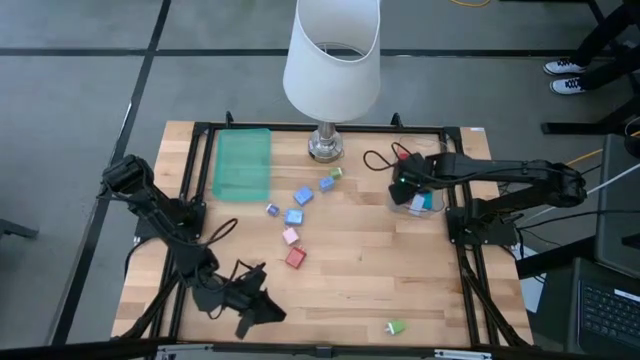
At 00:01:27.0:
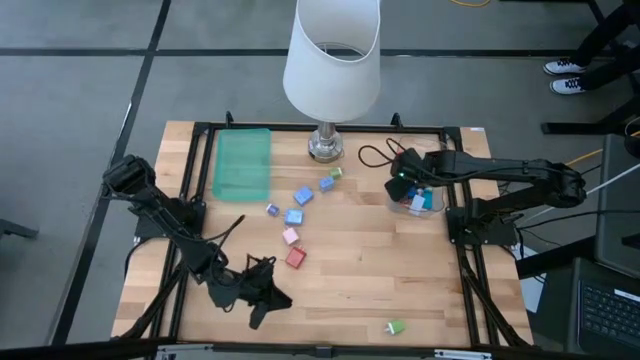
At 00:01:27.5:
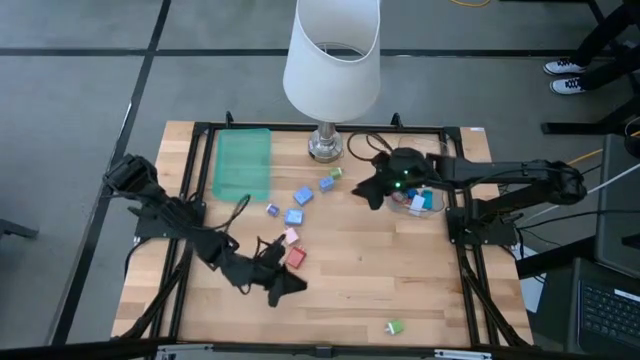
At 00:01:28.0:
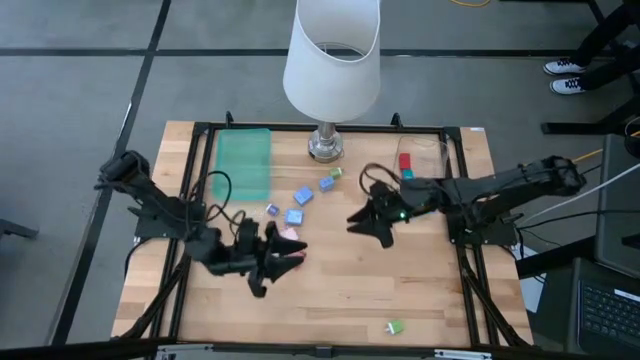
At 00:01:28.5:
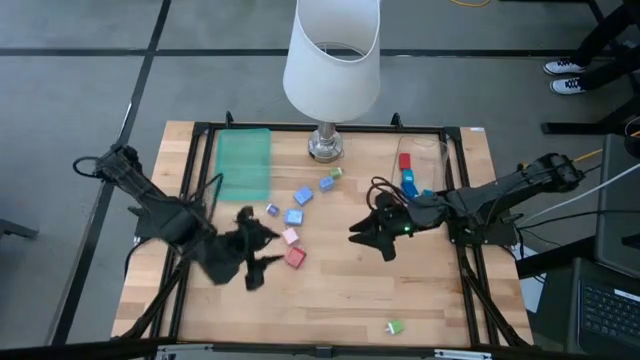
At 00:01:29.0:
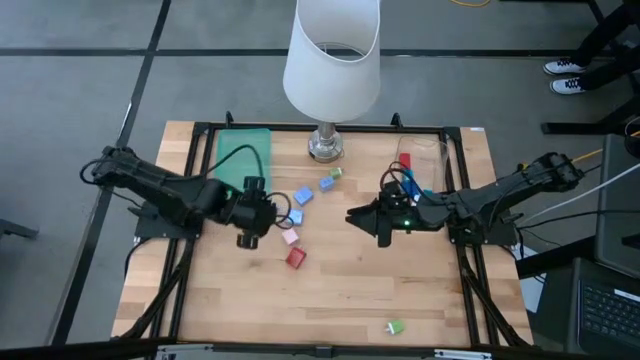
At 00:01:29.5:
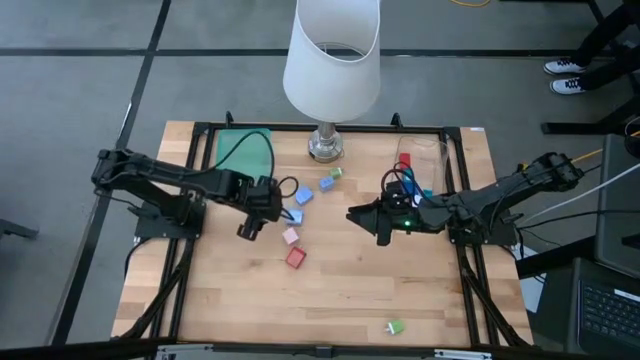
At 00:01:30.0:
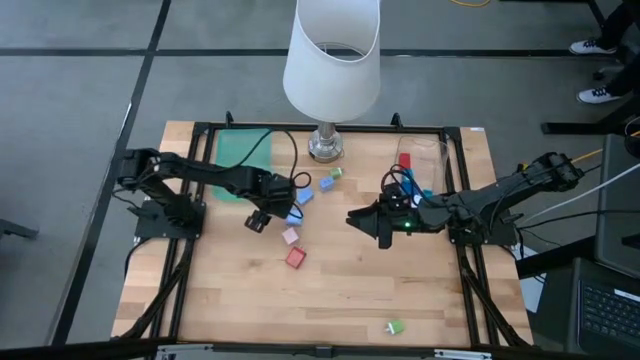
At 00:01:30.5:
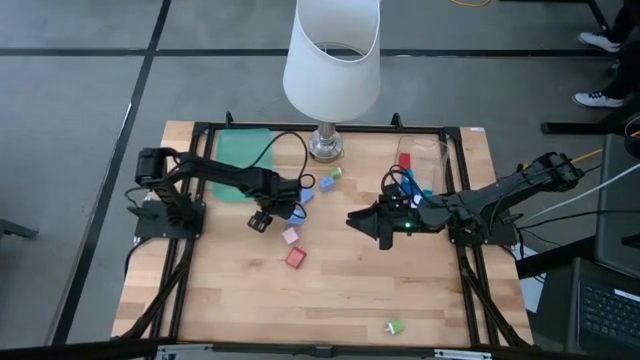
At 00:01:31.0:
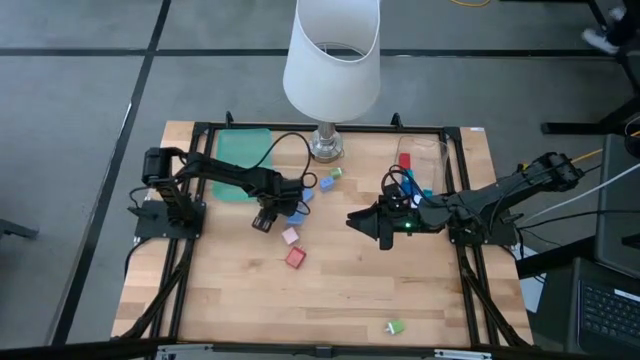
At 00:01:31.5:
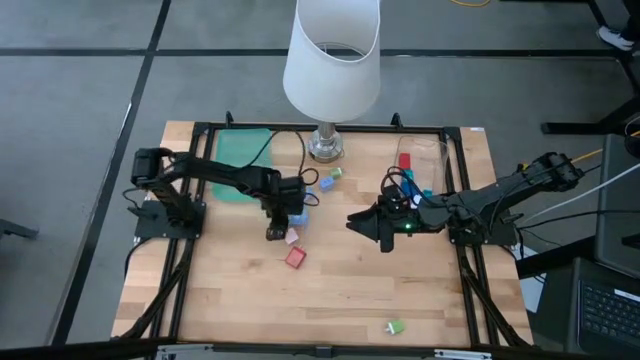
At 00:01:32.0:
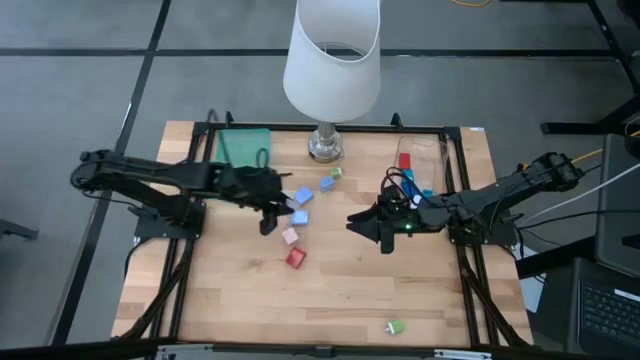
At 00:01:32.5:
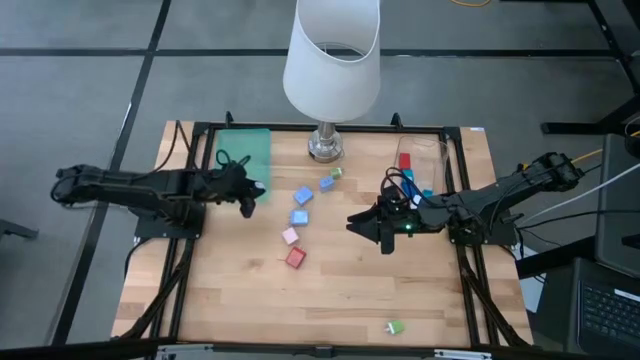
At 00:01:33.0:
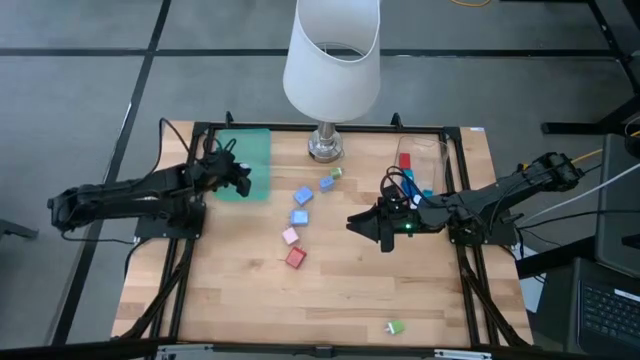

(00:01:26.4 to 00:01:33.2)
Task: Pick & Place Office items
Put the blue charger adapter into the green bin

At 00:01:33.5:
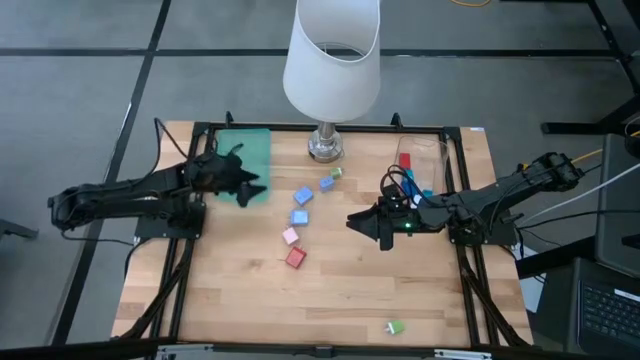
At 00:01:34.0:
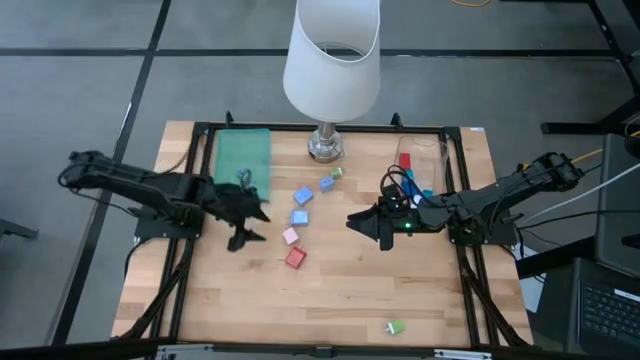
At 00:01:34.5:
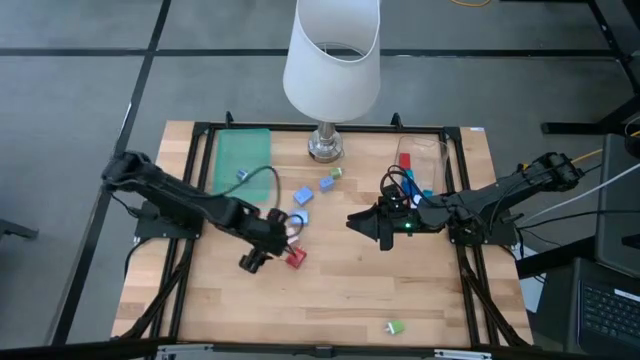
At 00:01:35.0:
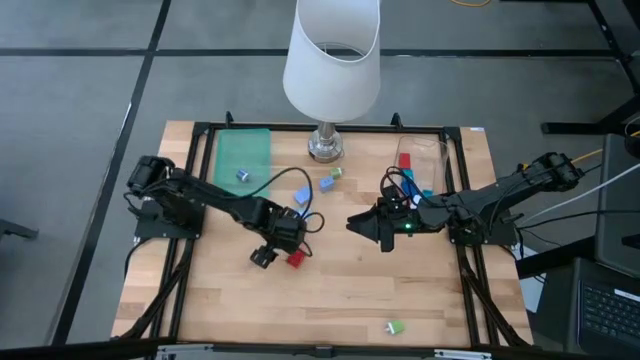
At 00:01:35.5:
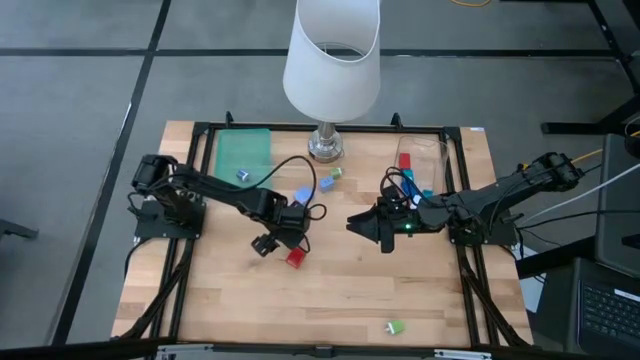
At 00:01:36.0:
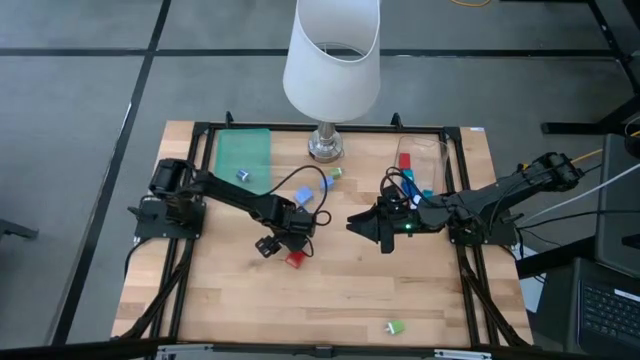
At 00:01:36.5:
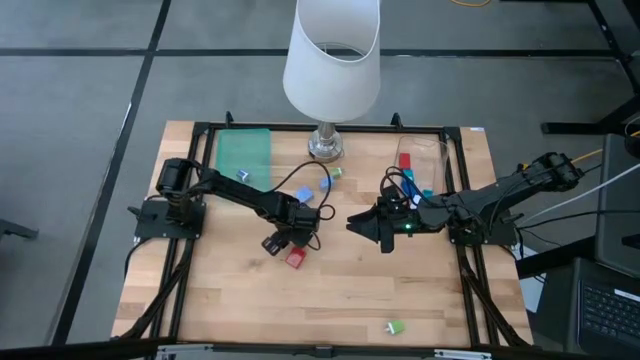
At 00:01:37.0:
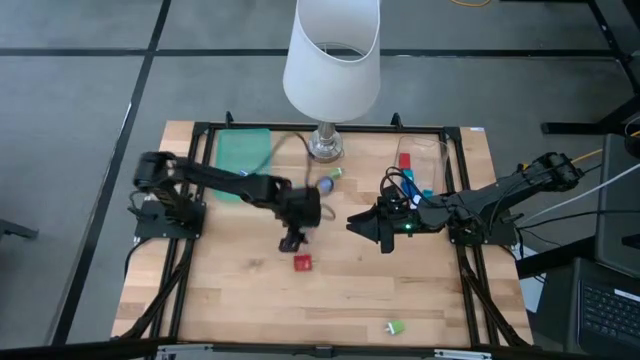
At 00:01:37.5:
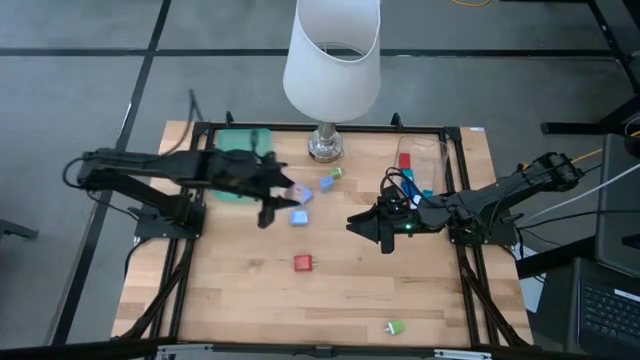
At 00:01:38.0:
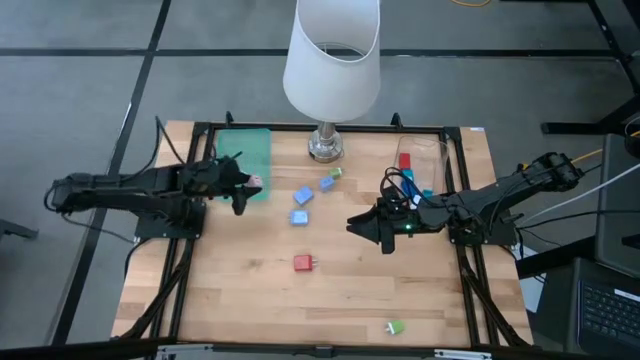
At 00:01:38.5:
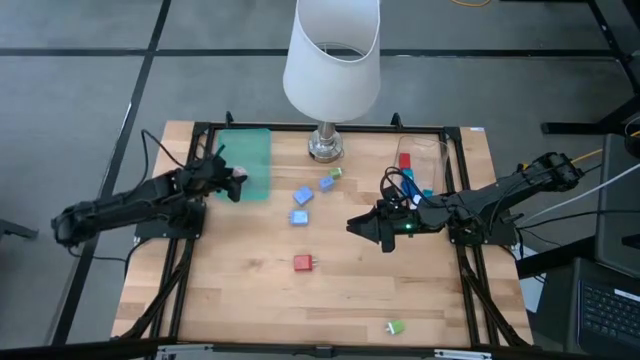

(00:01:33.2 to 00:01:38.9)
Put the pink charger adapter into the green bin

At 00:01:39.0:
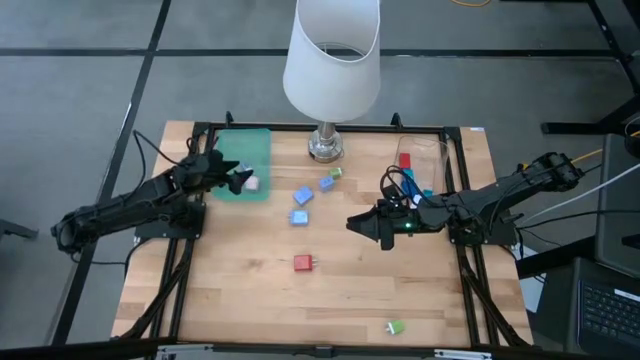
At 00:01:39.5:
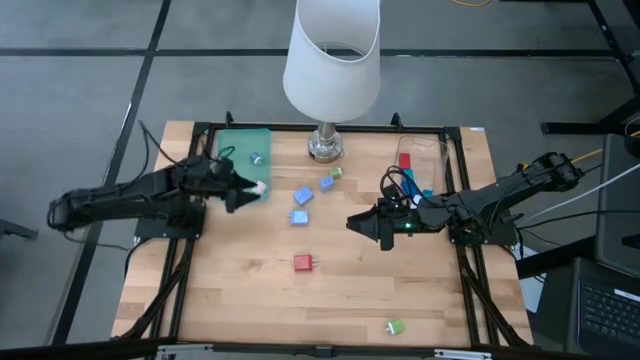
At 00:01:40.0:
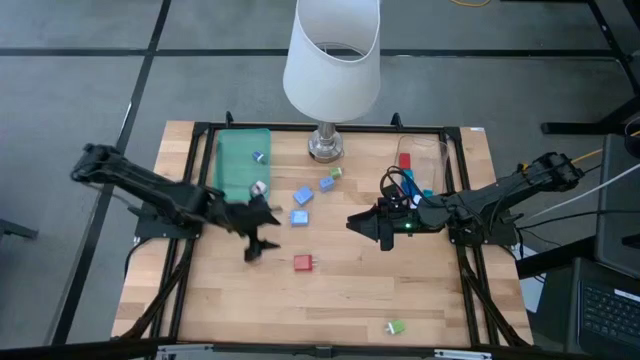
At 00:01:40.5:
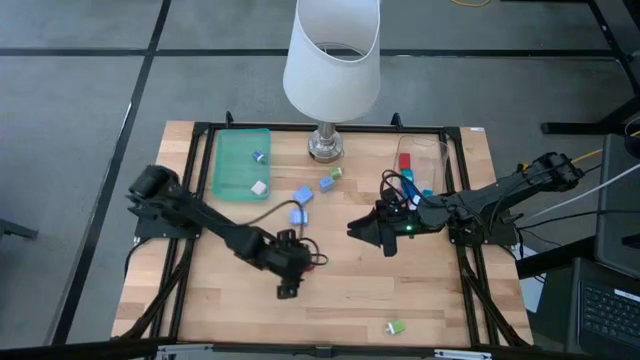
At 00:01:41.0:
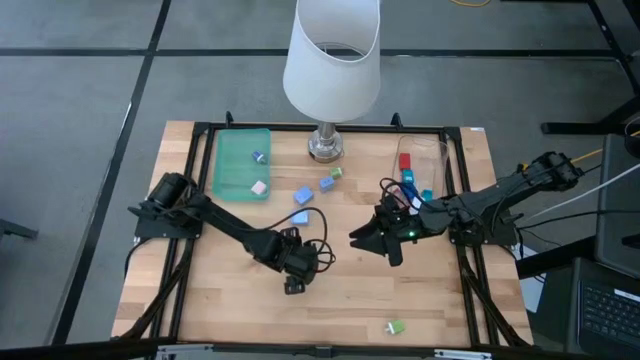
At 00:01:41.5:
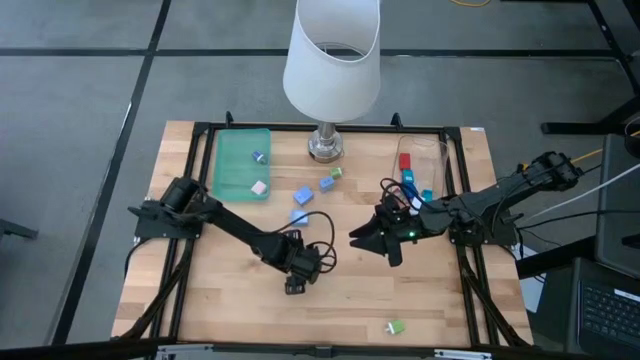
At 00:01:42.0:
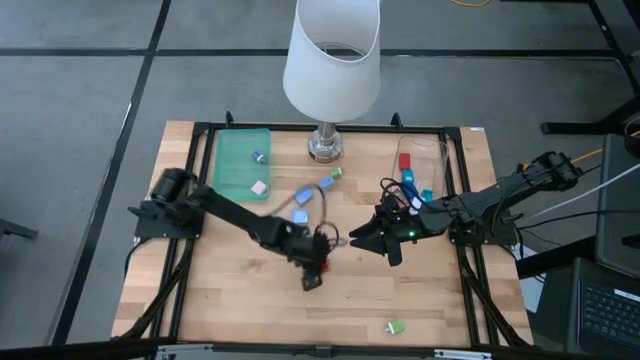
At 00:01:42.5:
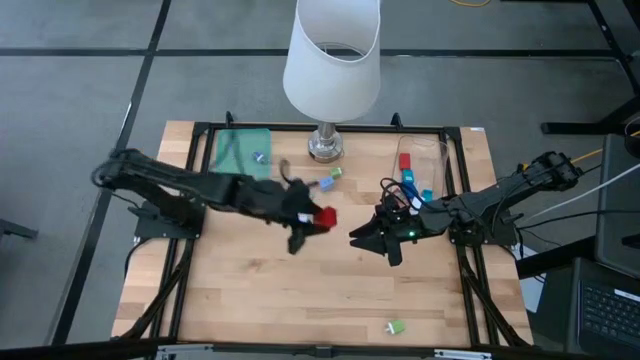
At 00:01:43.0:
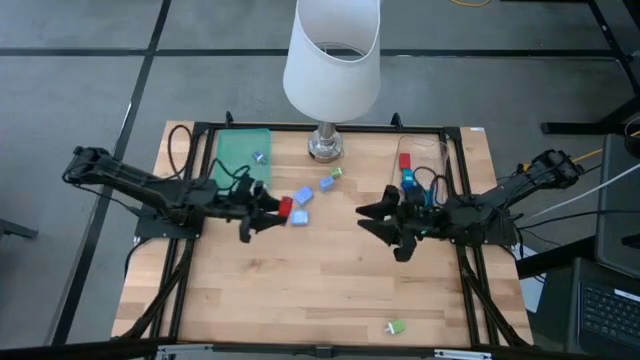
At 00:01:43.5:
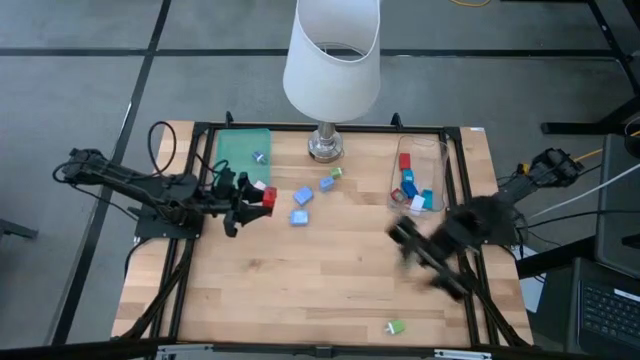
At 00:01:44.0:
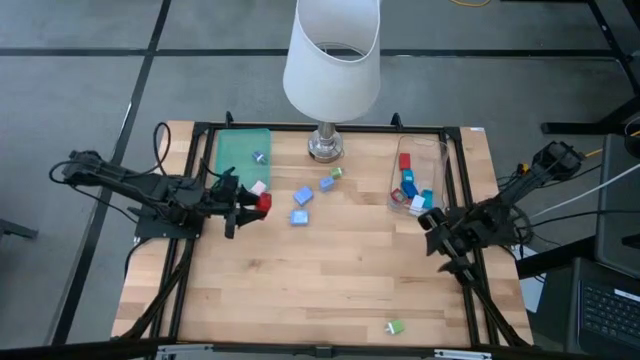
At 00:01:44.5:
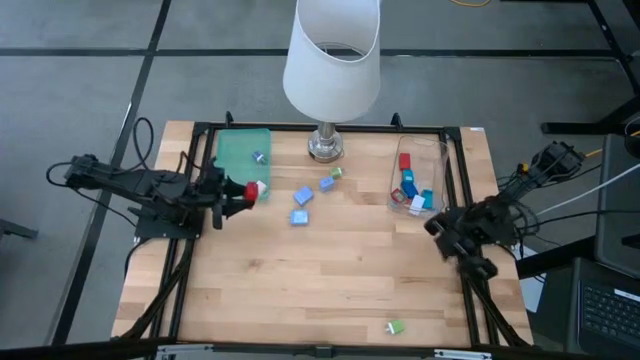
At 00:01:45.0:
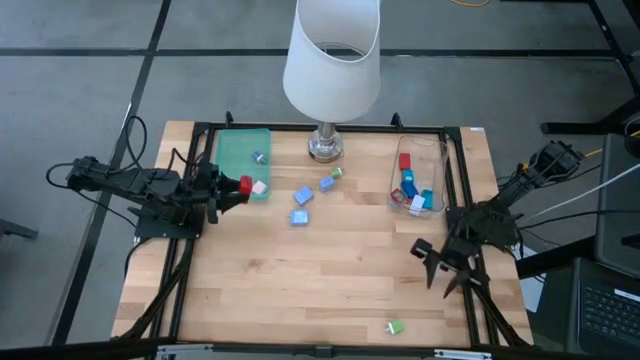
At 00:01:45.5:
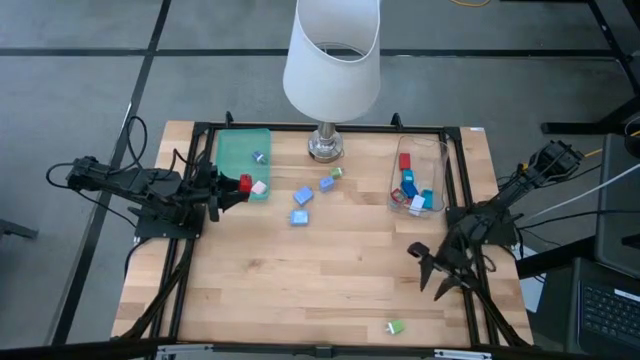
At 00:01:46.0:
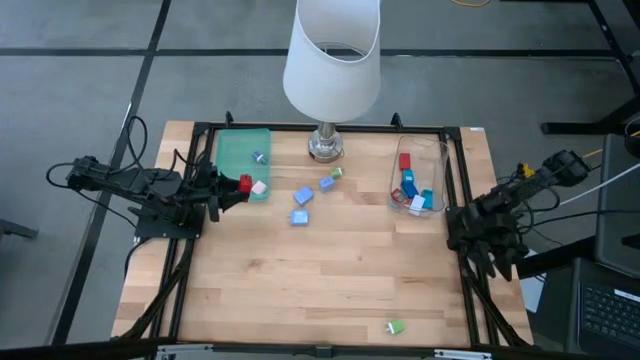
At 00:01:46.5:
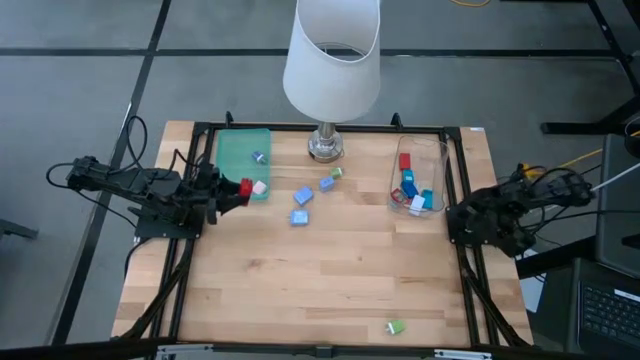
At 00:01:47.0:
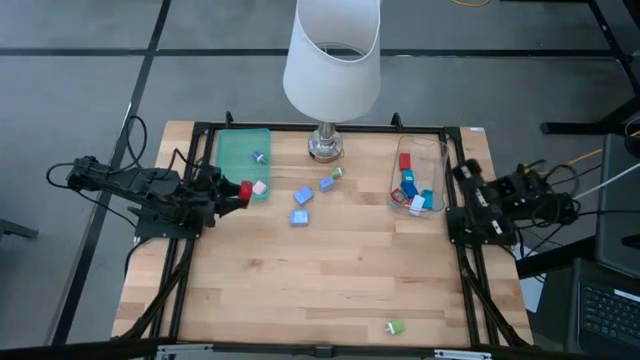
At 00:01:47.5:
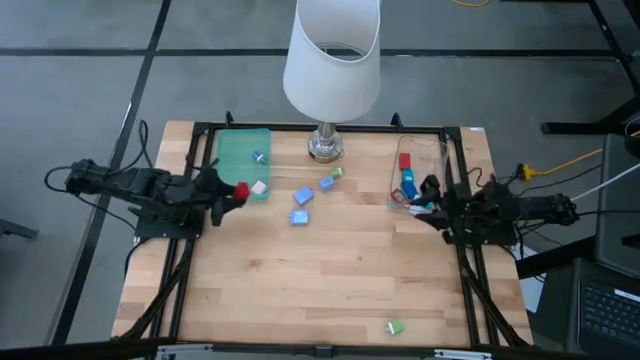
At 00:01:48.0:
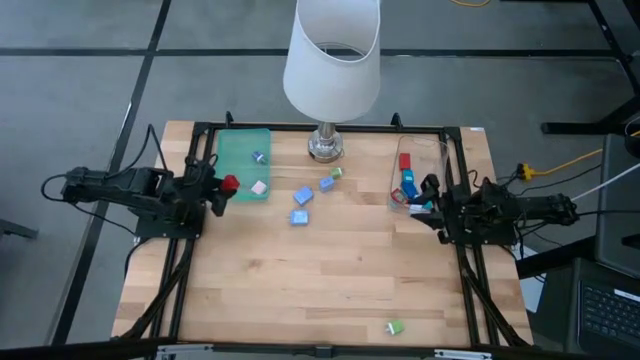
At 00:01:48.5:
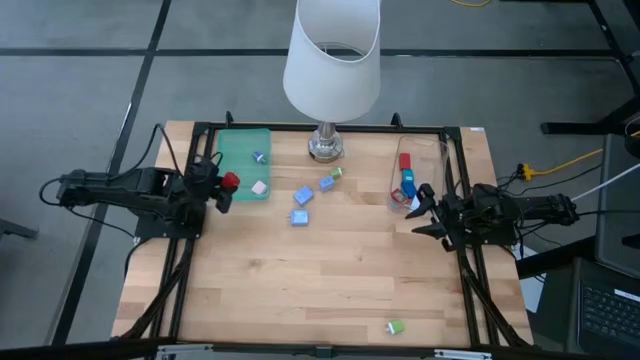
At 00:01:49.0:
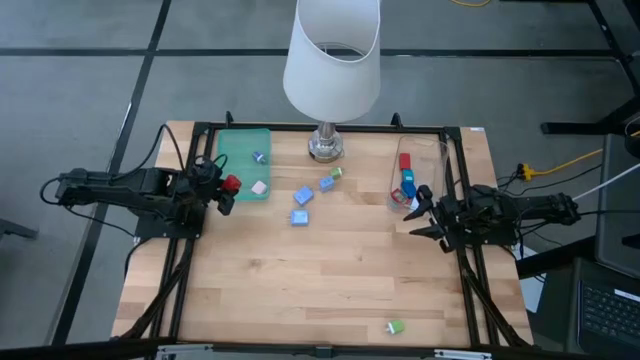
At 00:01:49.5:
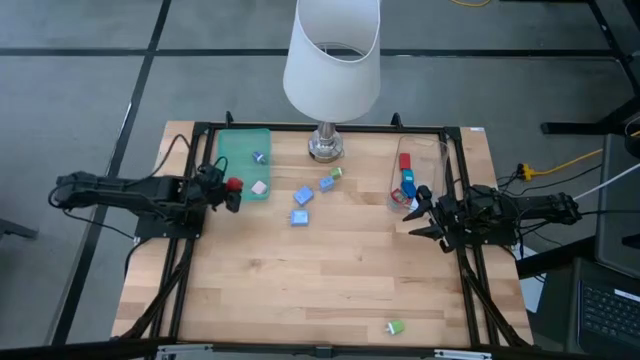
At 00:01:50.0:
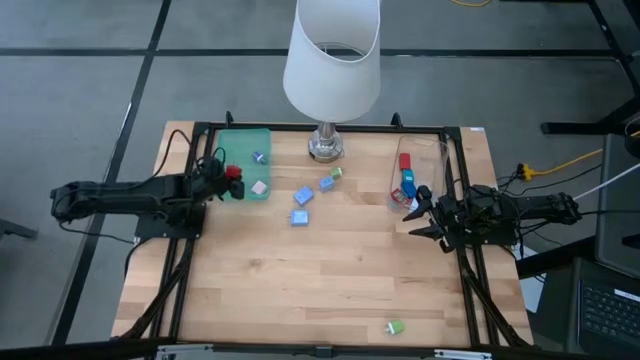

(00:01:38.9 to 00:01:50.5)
Put the red charger adapter into the green bin
